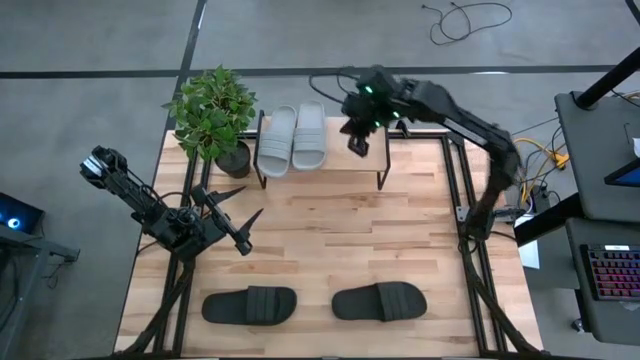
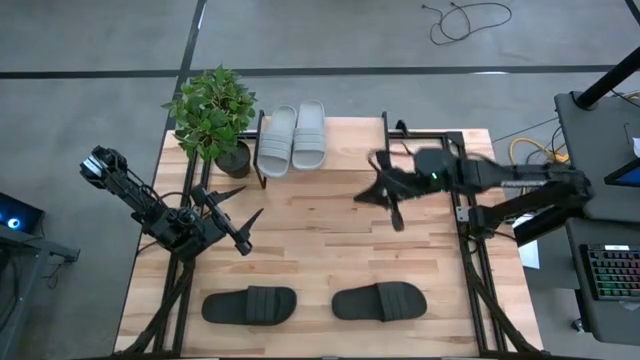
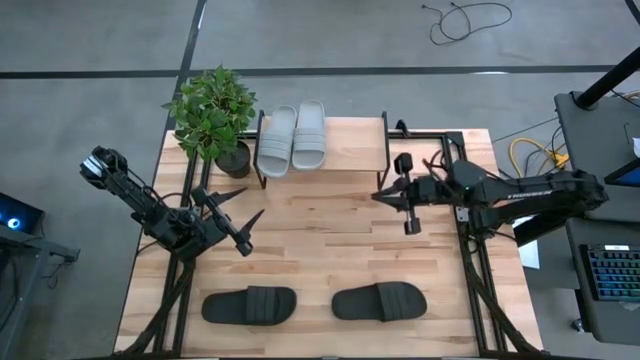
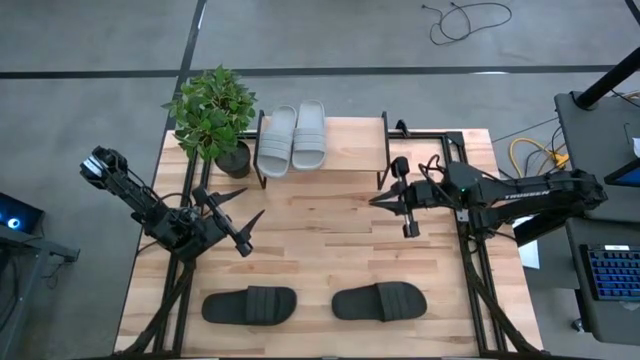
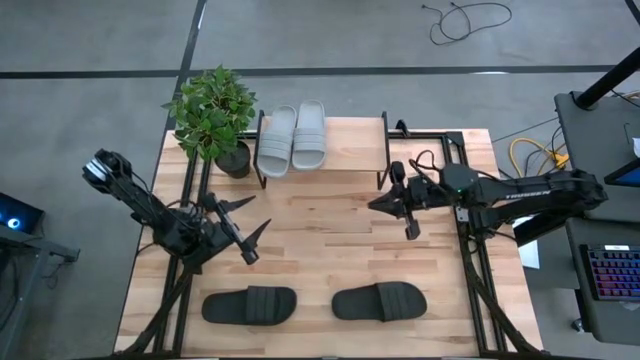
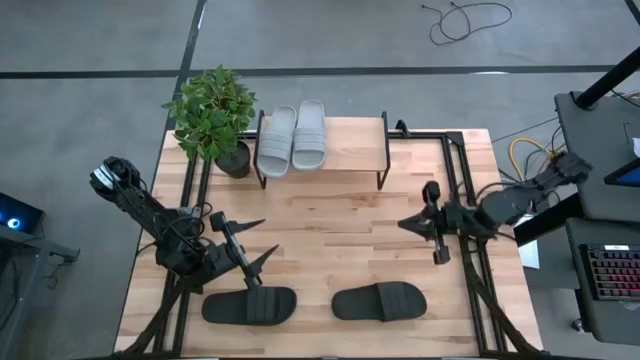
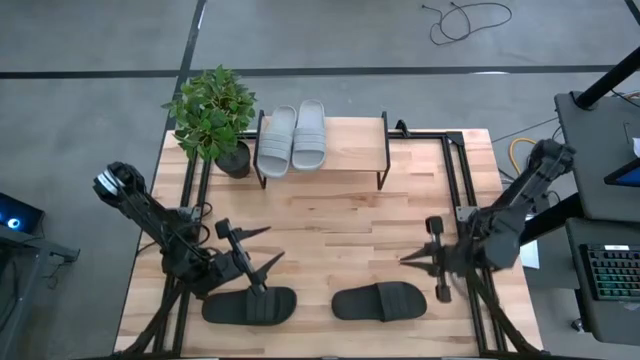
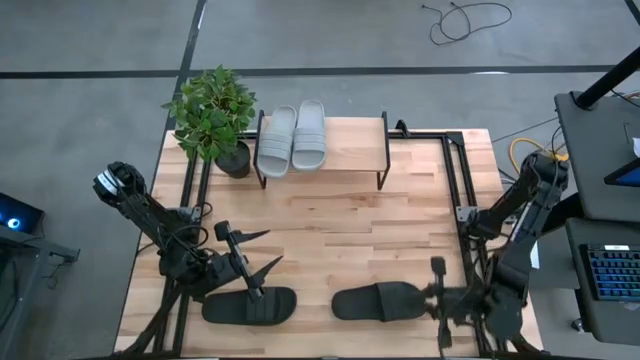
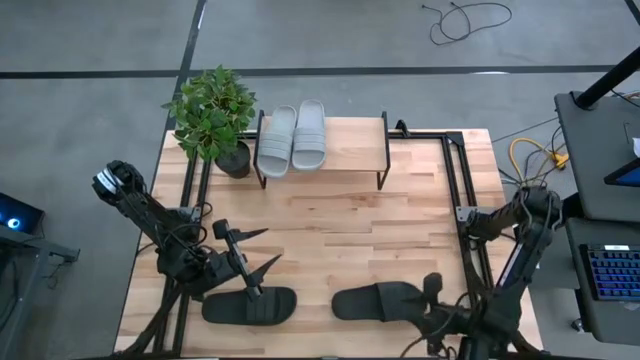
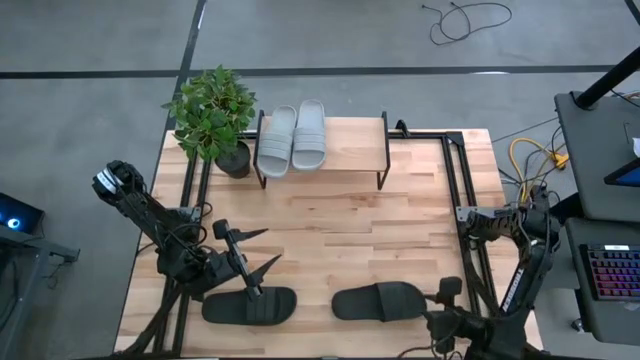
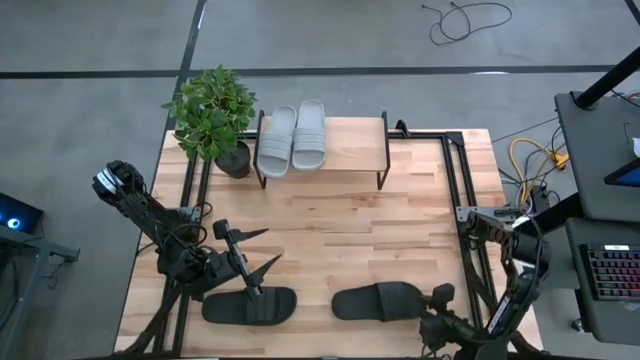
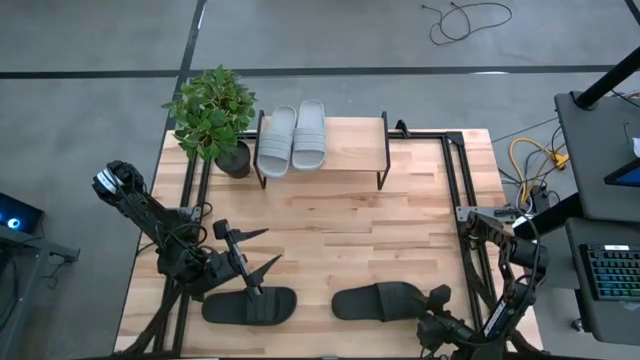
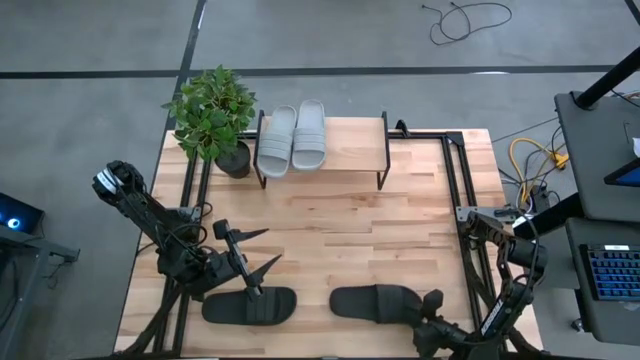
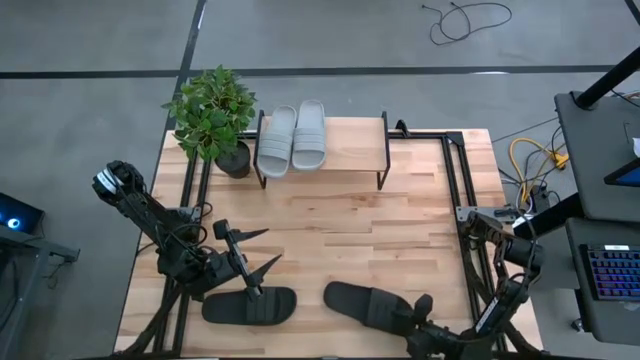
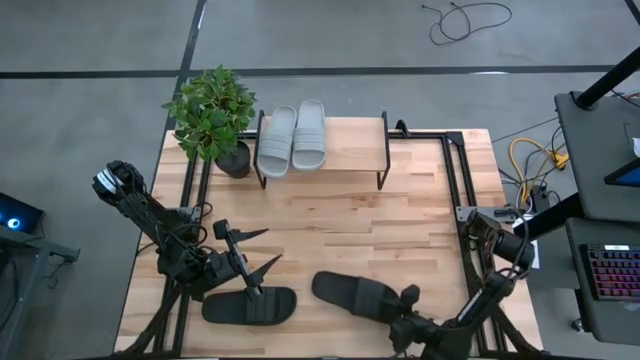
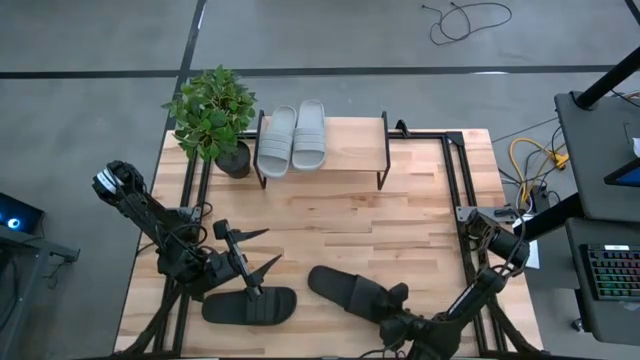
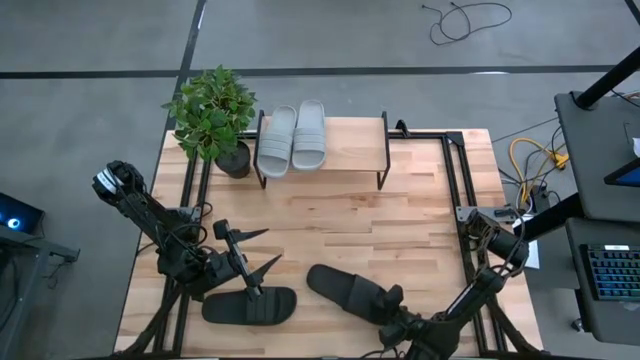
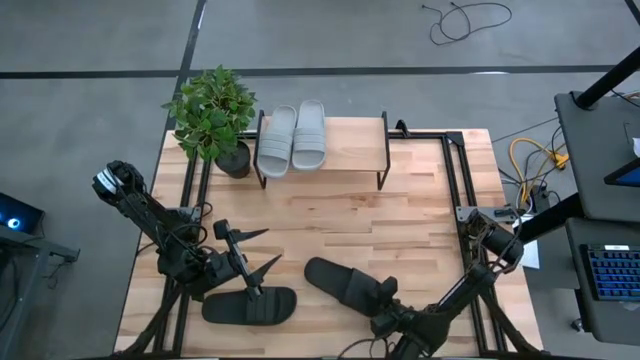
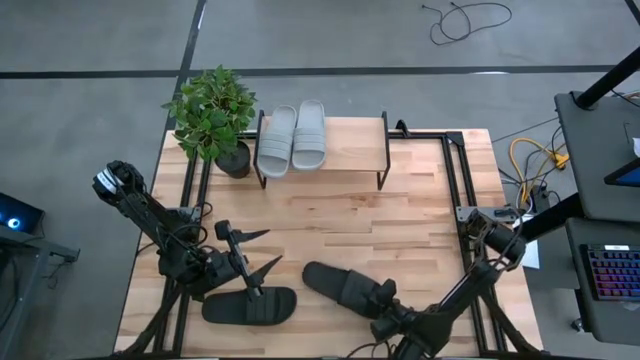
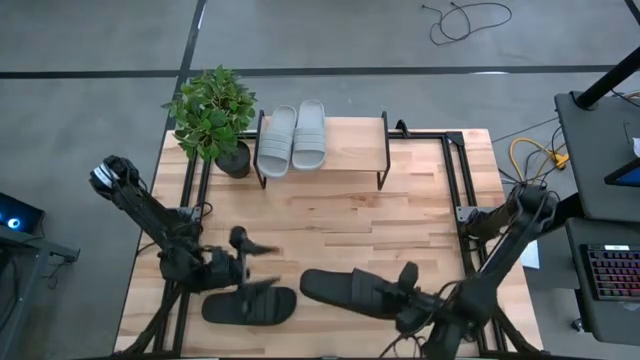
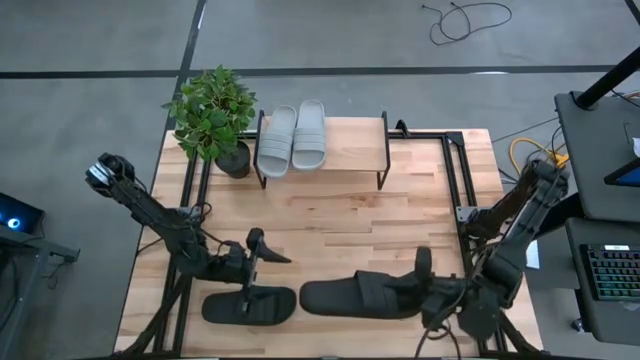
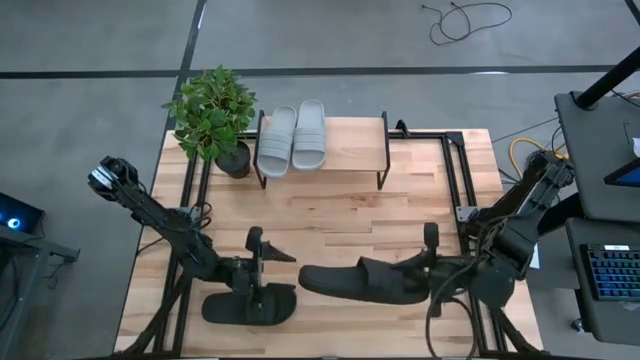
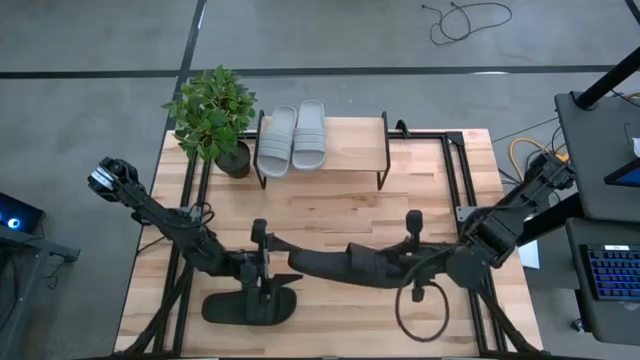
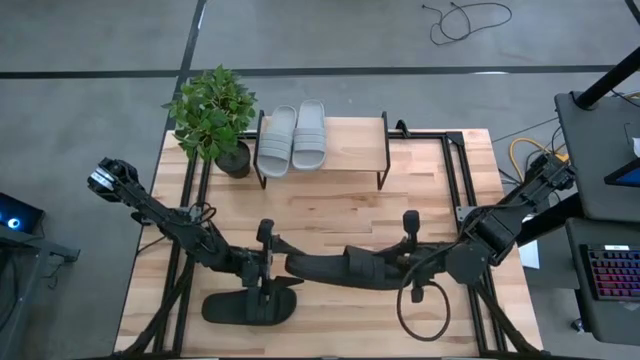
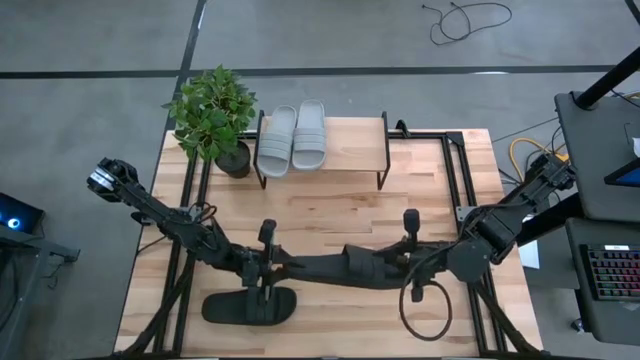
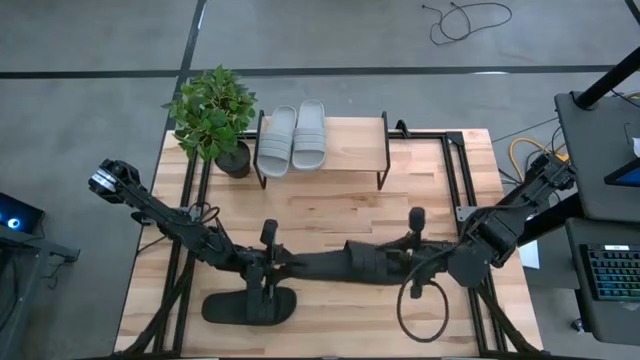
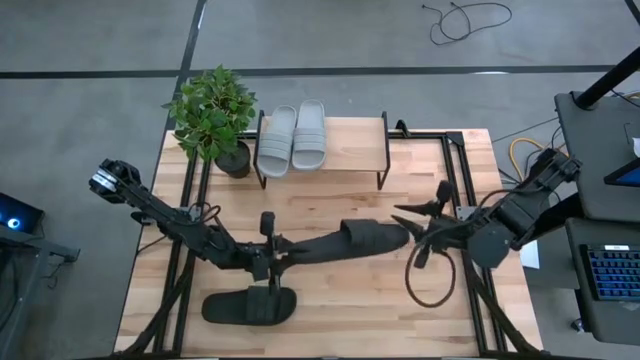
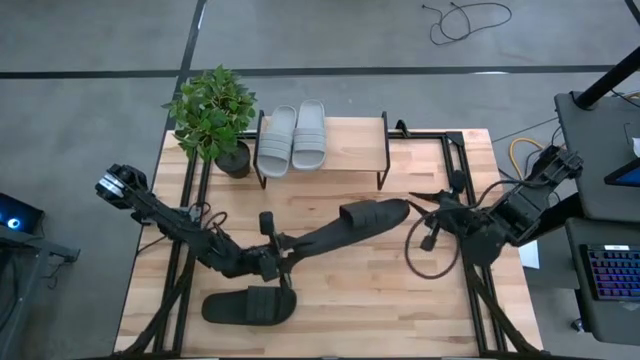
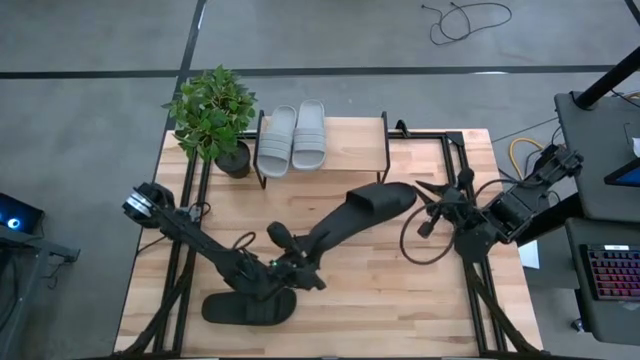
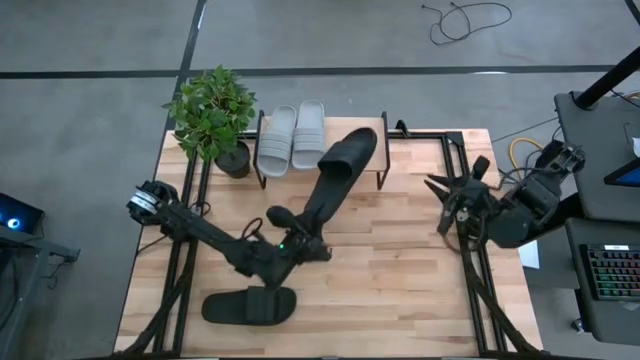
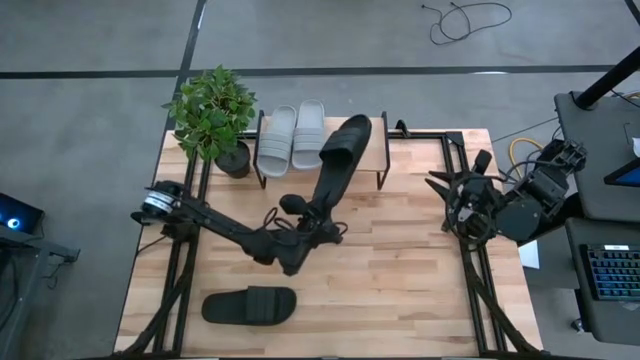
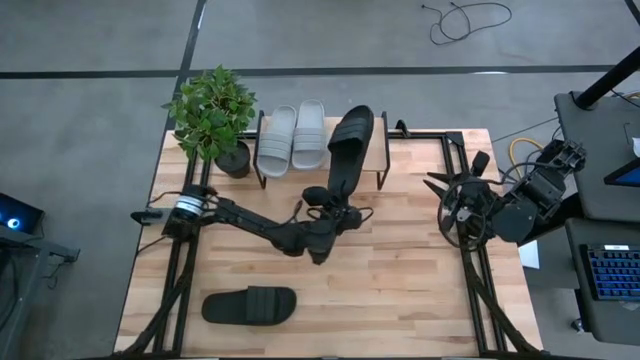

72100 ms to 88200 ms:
Task: Pick and place slides into the shelf
Put the right black slipper on the shelf

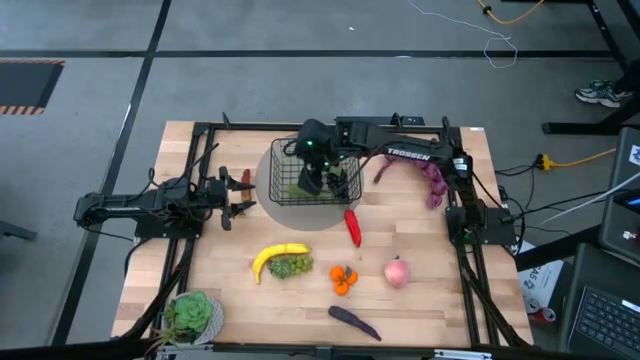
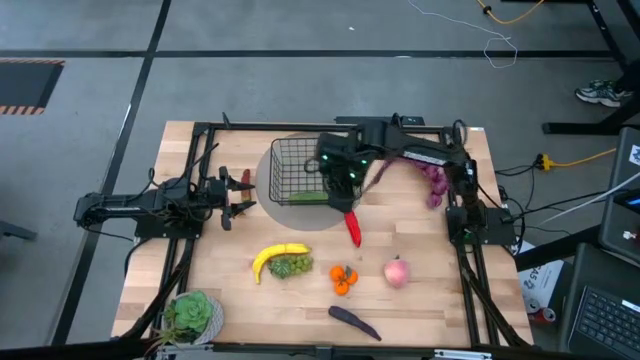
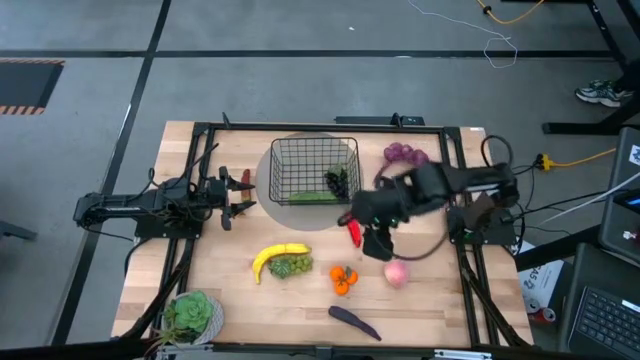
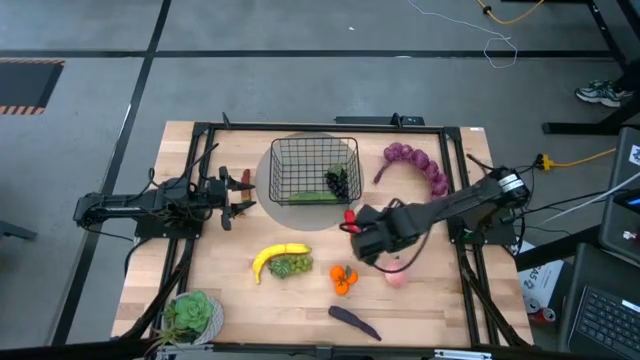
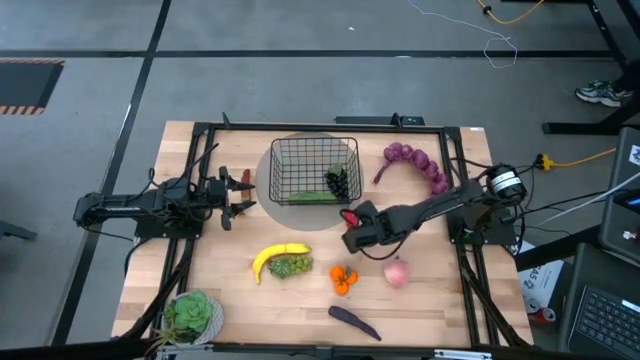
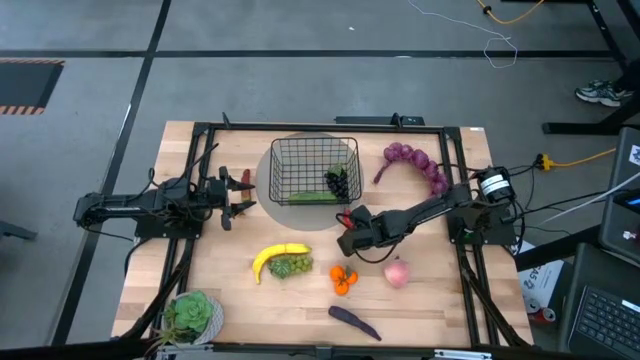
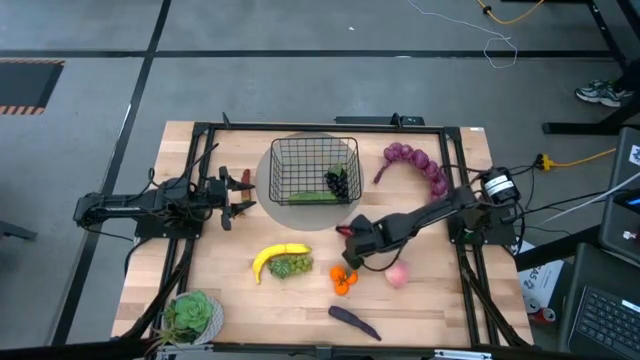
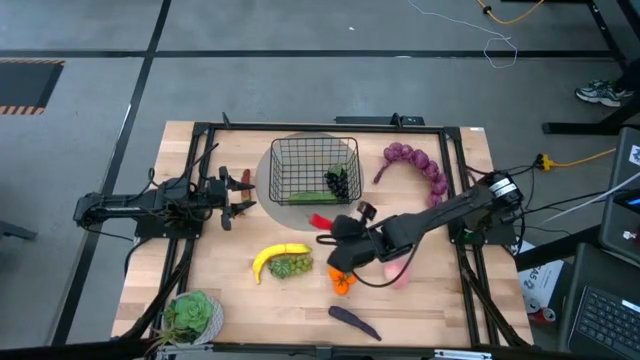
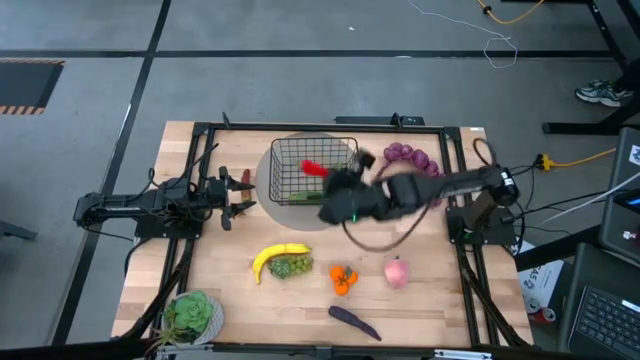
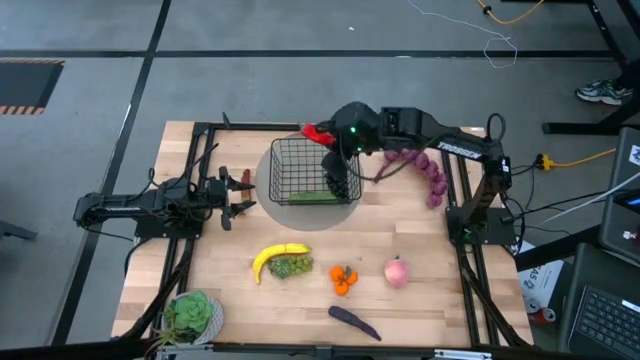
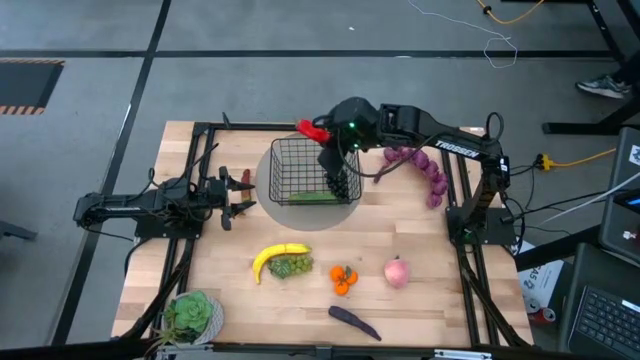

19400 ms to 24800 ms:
Task: Build produce basket
Put the red chili pepper into the wire basket
